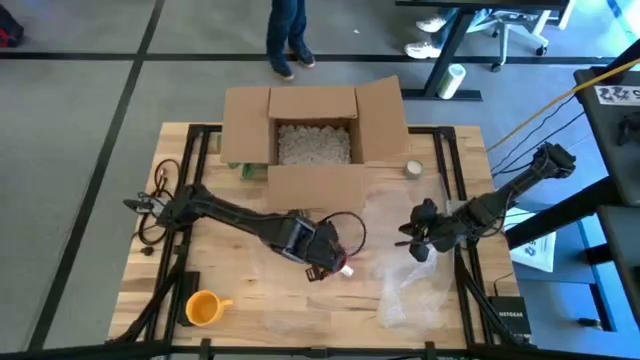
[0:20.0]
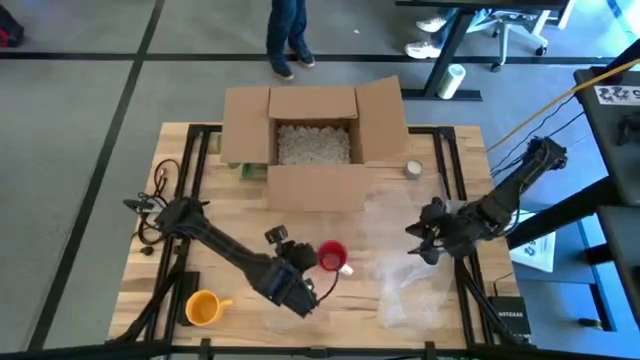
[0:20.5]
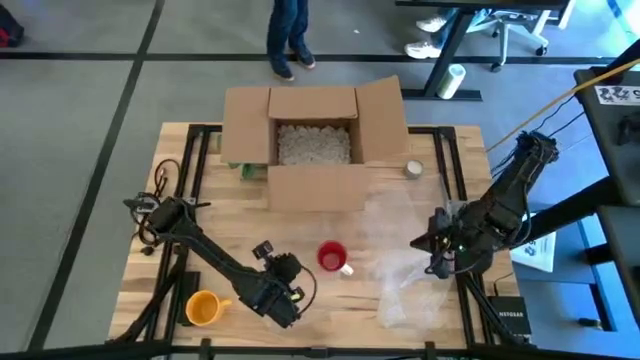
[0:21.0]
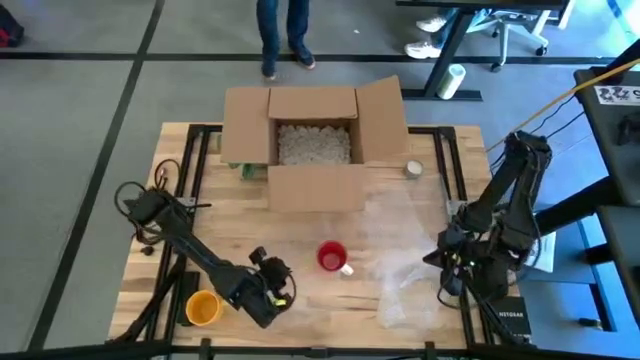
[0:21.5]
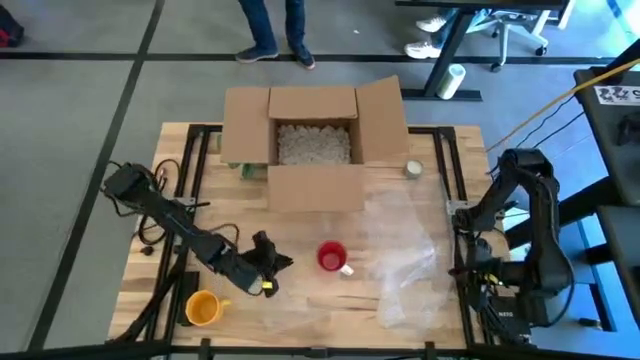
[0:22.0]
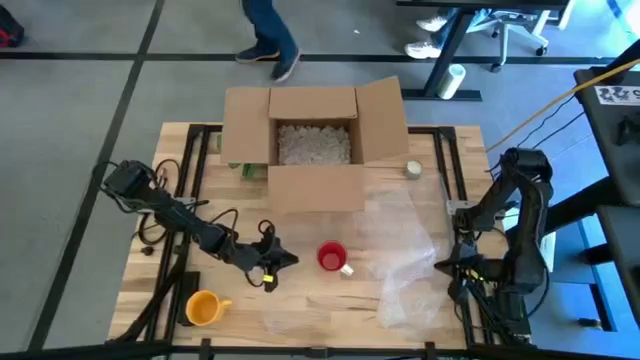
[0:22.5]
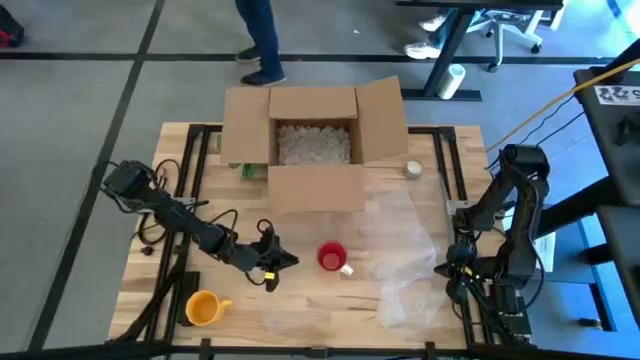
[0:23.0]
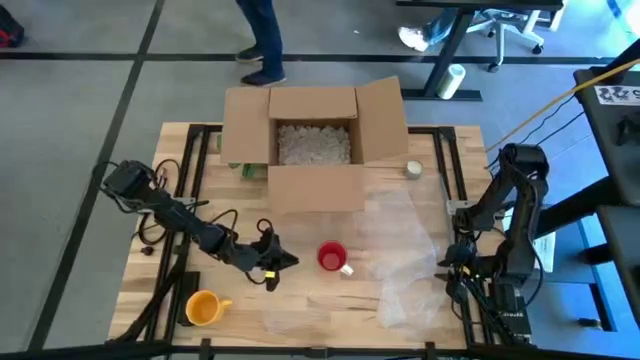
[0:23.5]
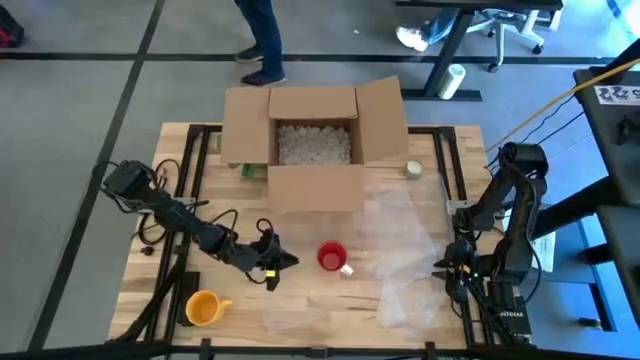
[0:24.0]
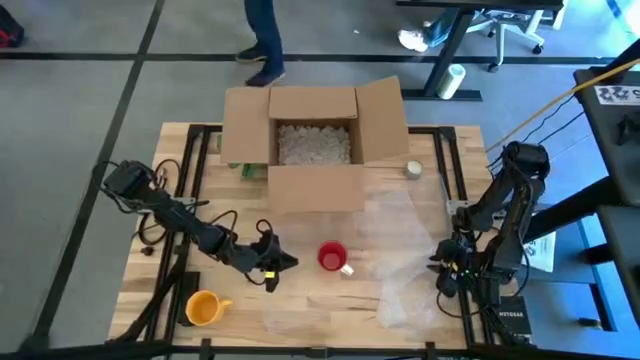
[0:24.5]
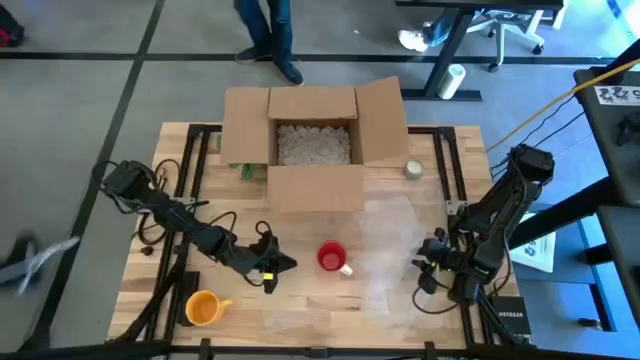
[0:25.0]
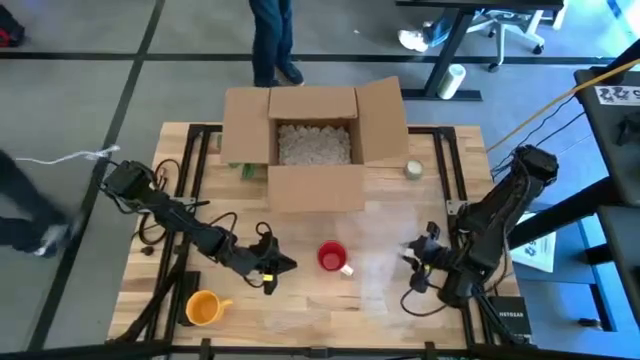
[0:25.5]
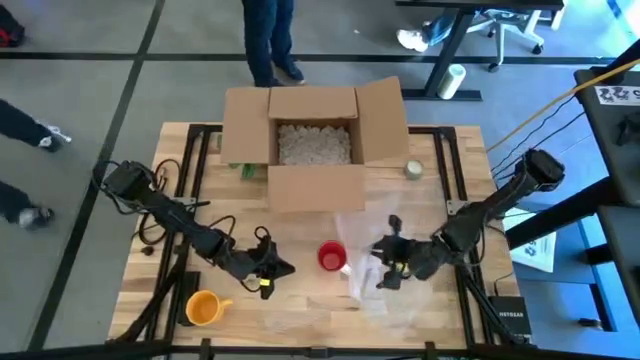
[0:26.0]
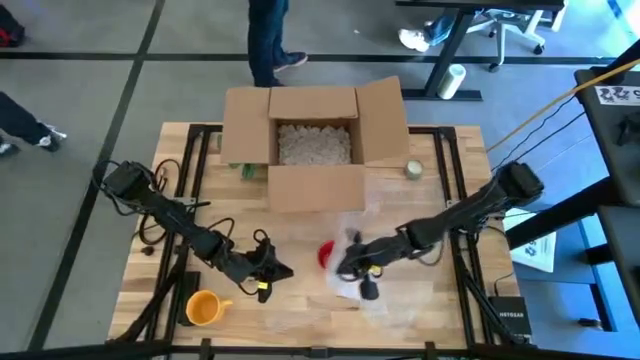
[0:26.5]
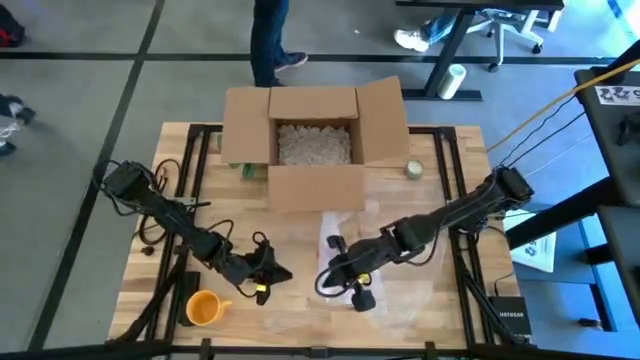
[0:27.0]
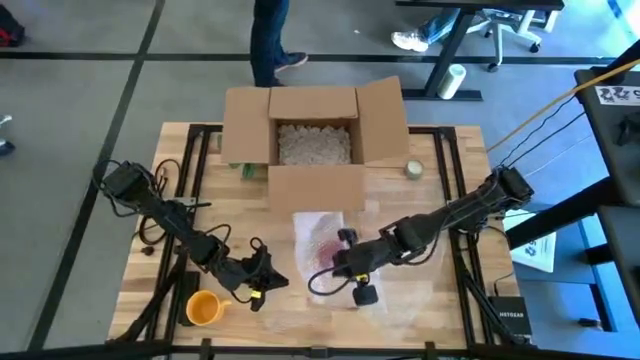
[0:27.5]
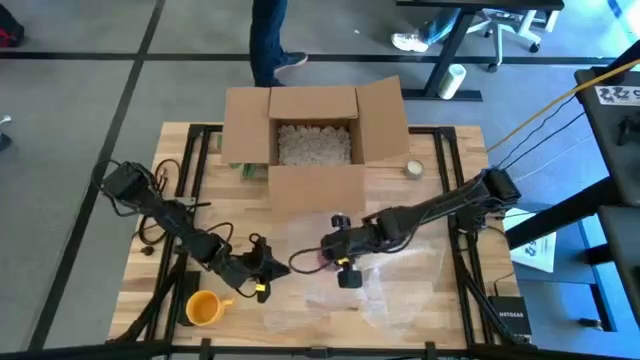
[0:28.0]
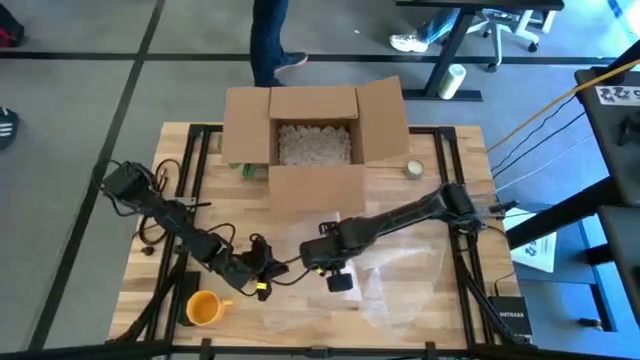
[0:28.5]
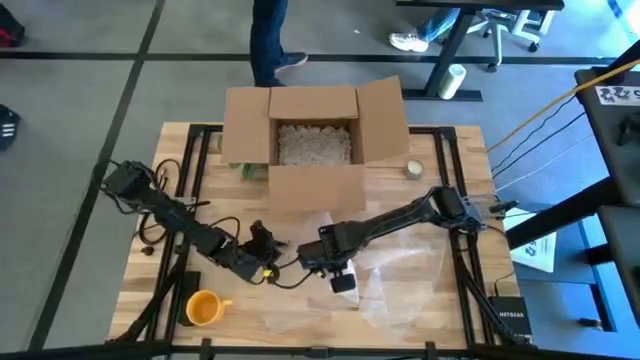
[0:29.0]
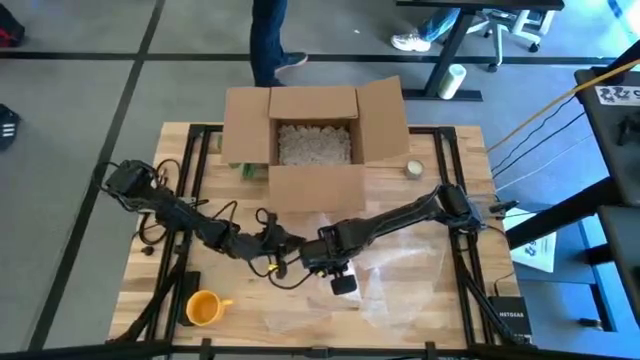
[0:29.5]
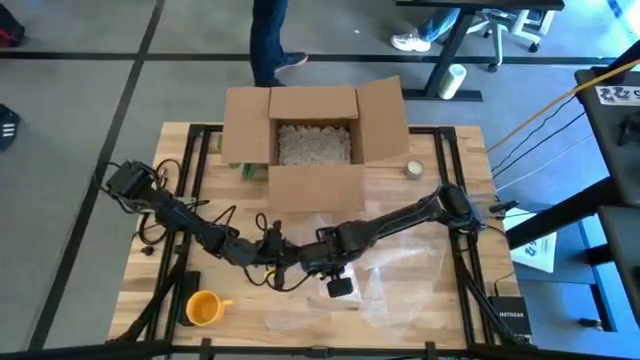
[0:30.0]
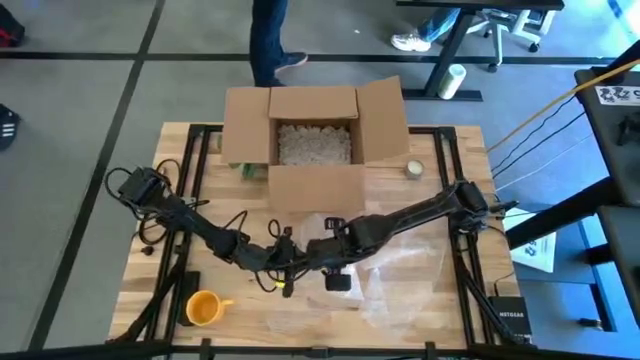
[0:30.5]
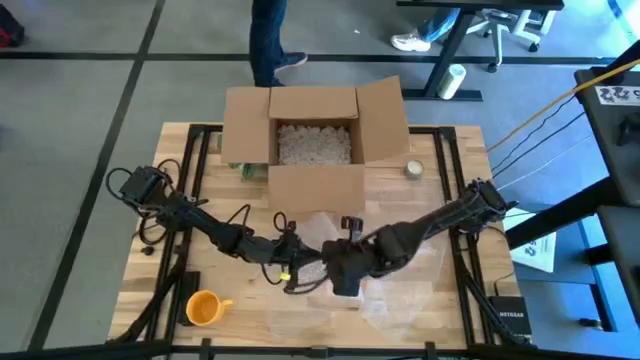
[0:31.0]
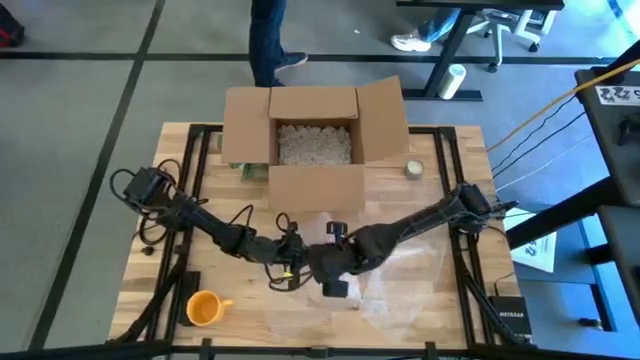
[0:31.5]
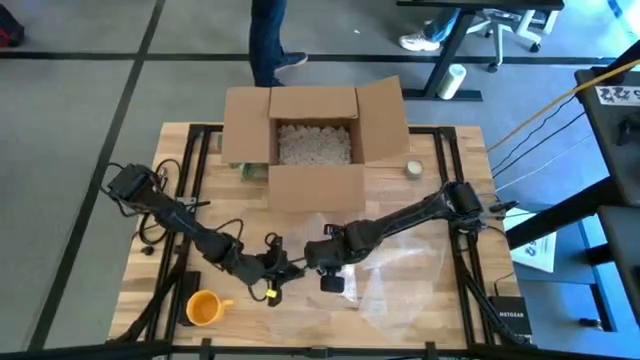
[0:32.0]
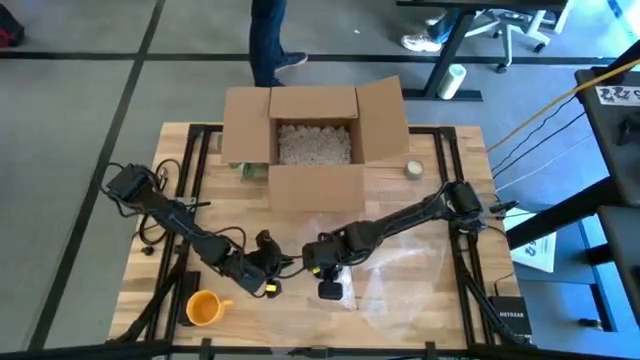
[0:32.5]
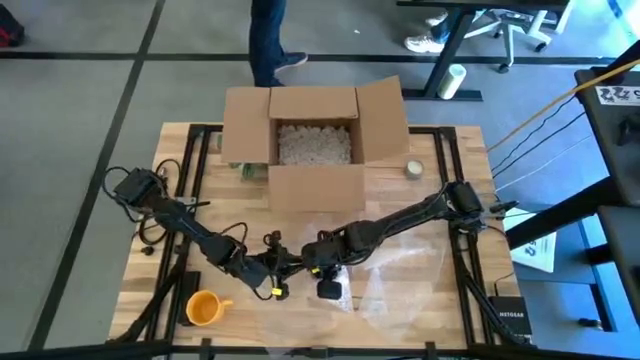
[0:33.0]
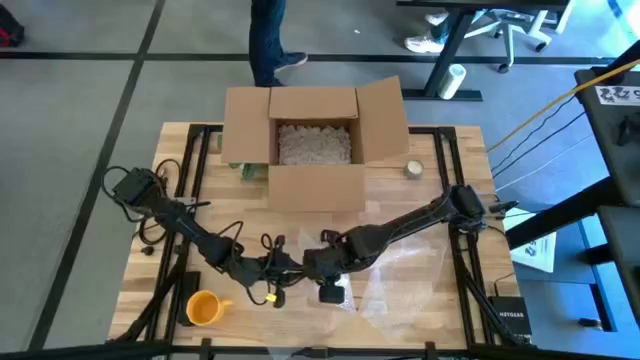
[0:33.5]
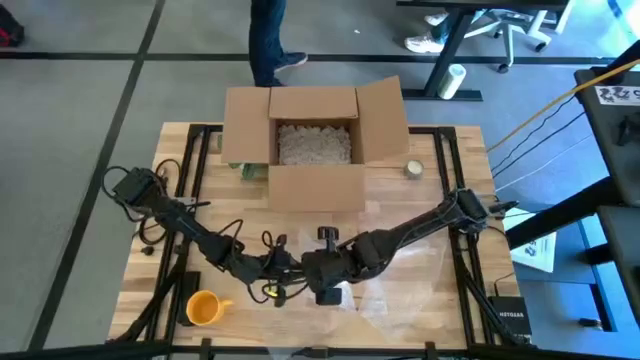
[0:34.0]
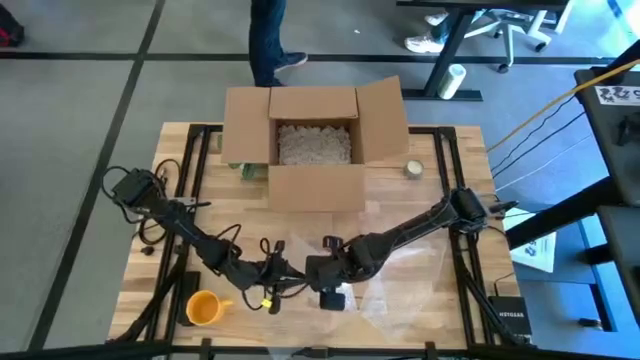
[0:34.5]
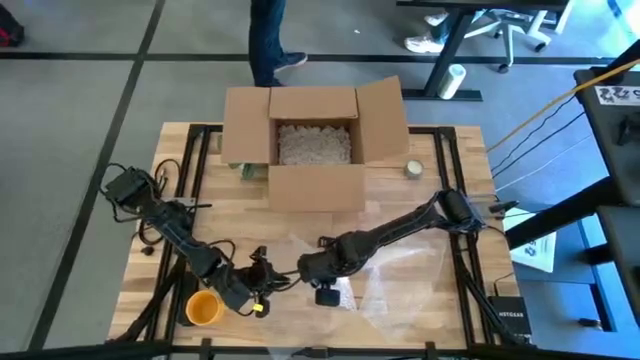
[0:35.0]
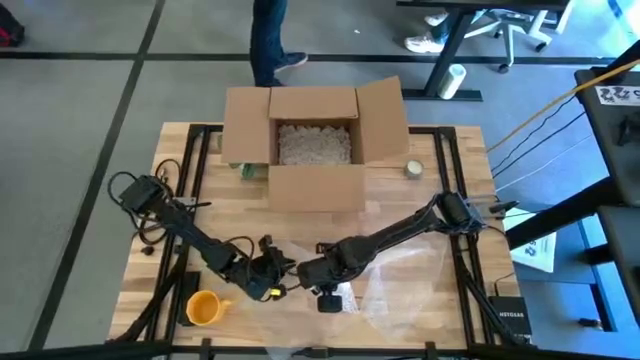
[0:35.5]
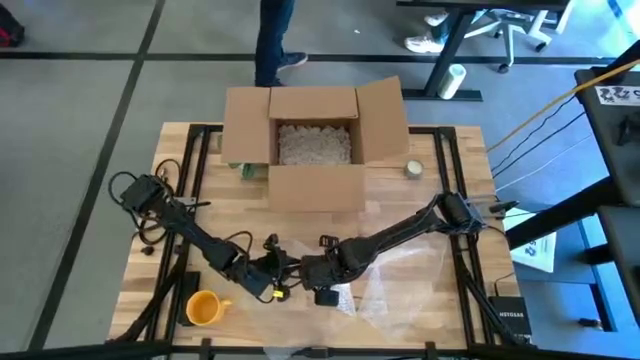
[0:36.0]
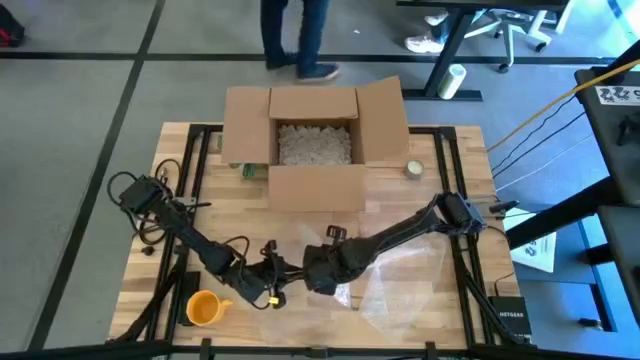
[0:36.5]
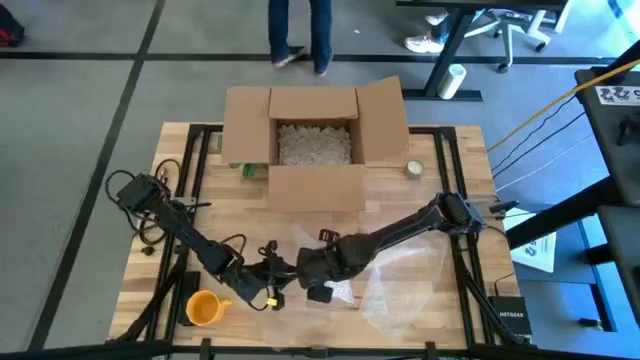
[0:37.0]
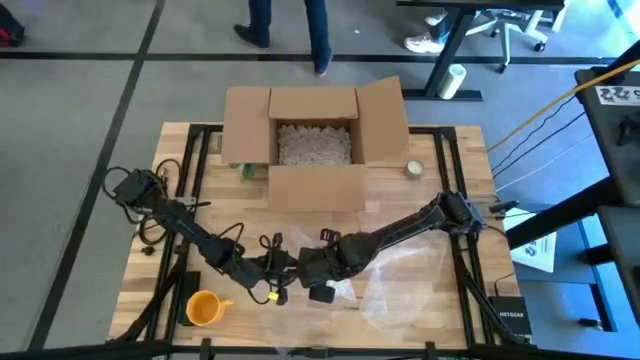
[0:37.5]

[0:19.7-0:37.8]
Task: wrap mug
Wrap the red mug with bubble wrap

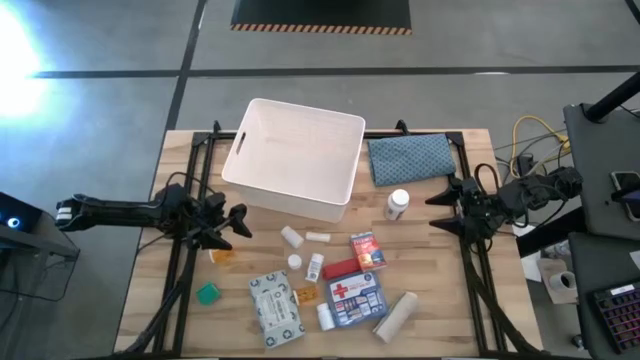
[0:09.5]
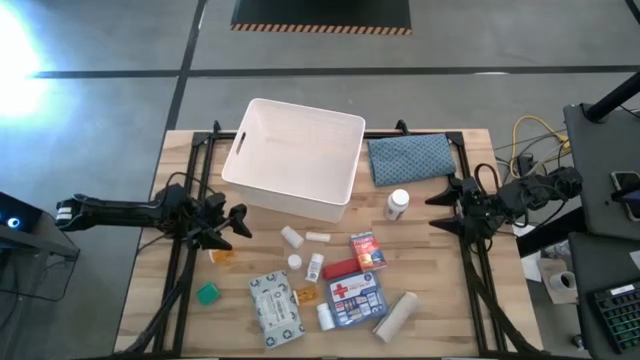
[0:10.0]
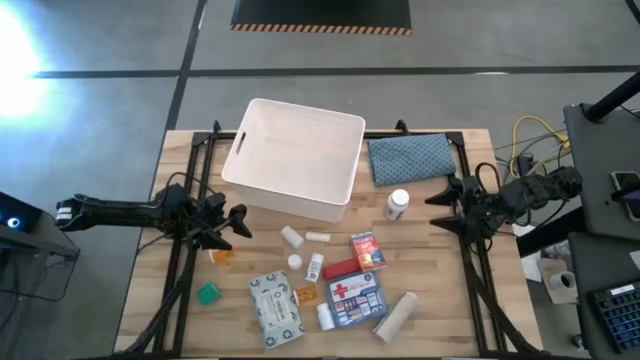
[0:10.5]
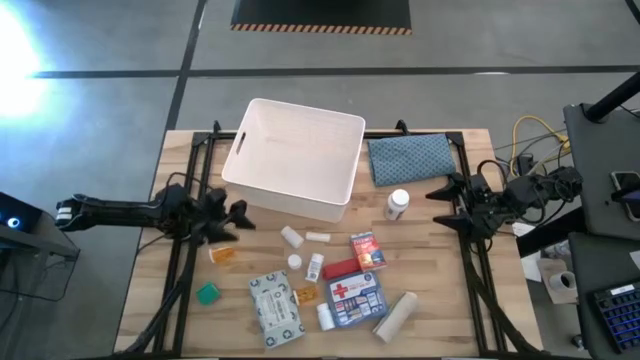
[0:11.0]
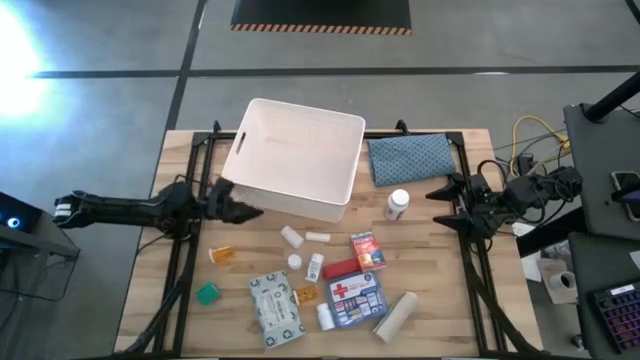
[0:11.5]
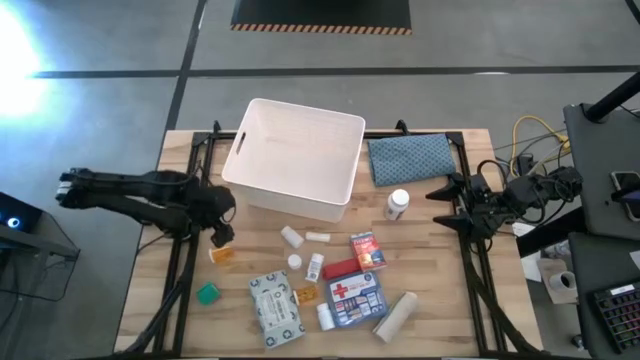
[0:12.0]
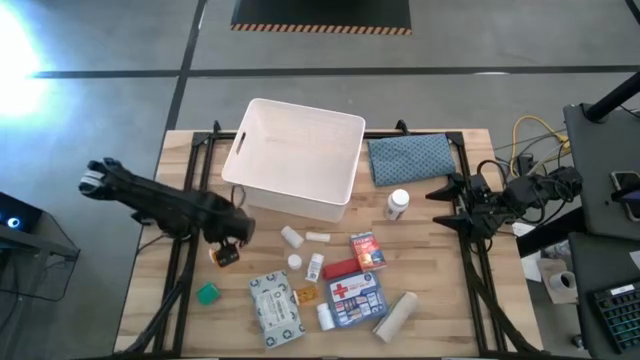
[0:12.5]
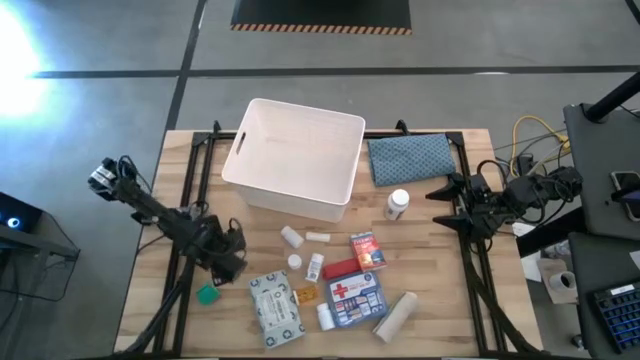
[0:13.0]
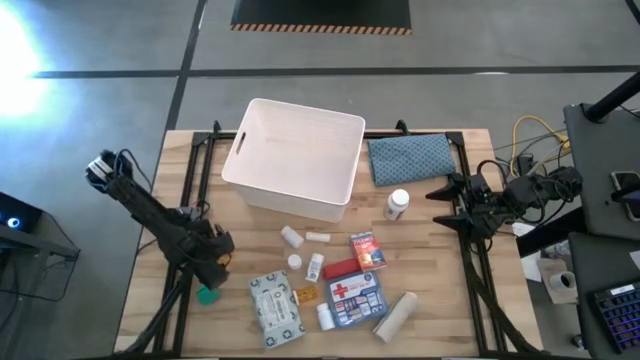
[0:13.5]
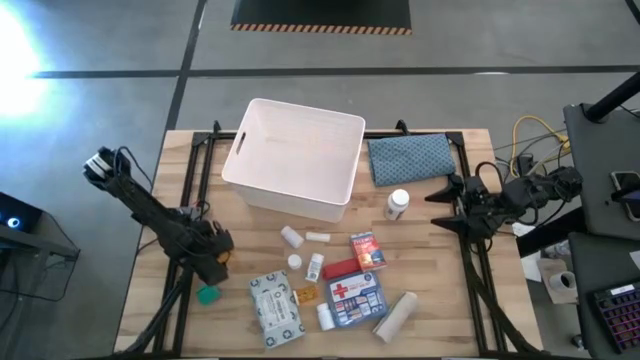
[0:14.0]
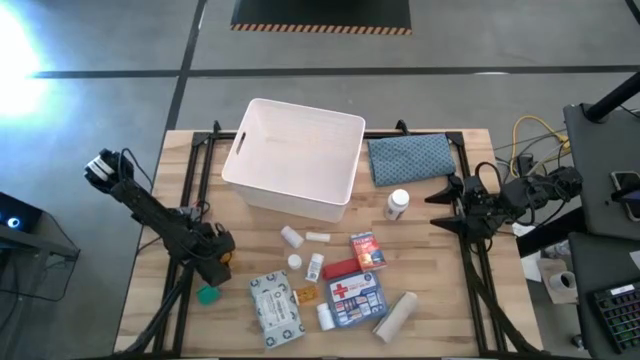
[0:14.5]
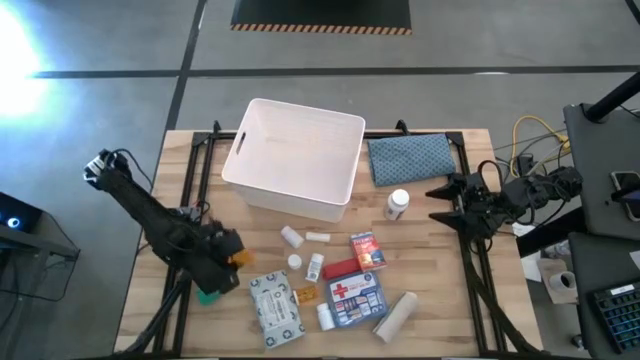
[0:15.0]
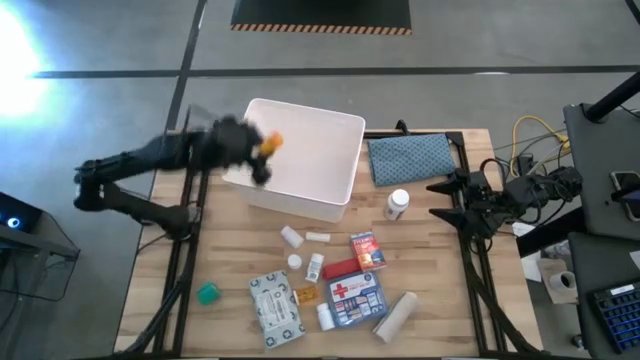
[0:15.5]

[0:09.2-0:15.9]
Task: Pick & place medical supplies in basket/bin
Put the left orange pill bottle into the white bin
